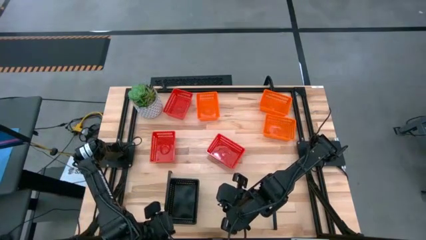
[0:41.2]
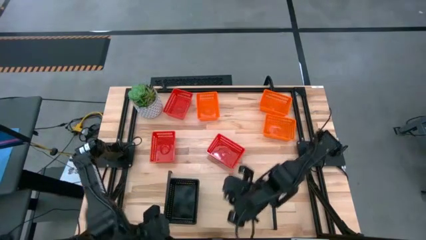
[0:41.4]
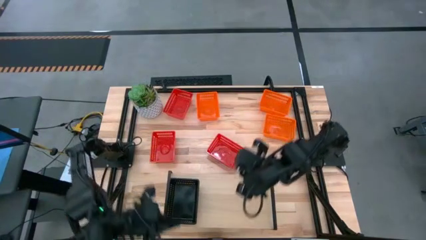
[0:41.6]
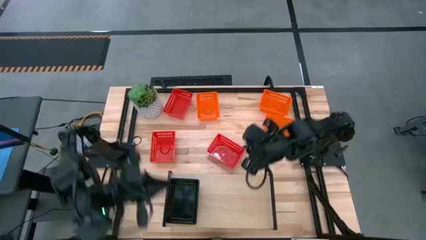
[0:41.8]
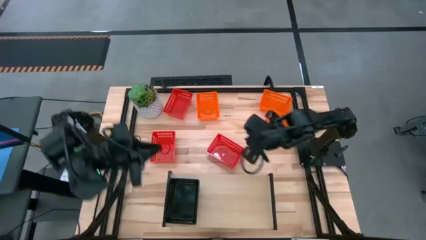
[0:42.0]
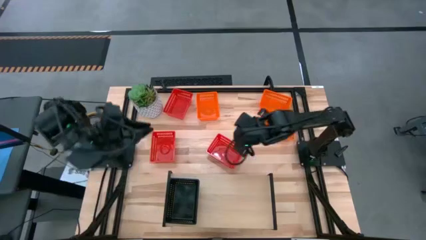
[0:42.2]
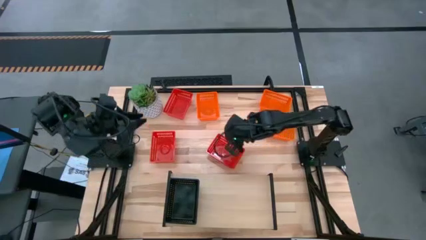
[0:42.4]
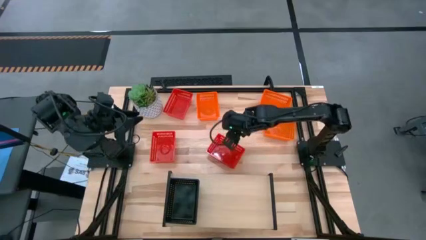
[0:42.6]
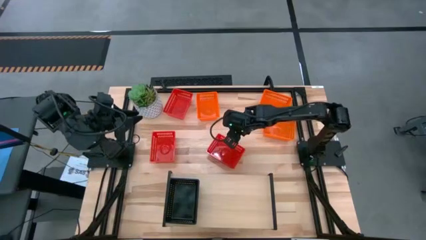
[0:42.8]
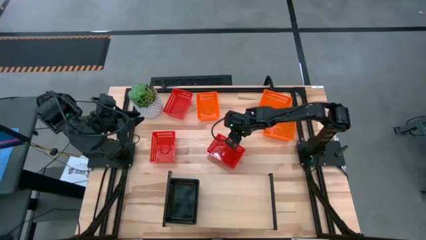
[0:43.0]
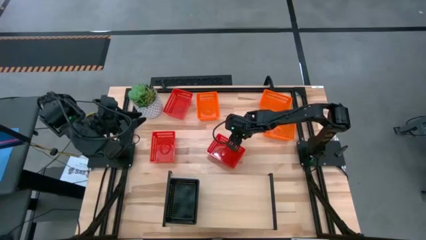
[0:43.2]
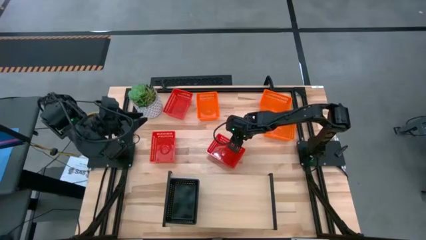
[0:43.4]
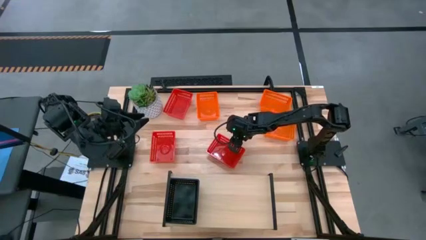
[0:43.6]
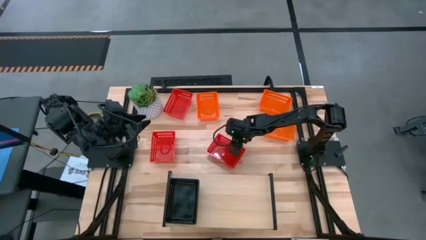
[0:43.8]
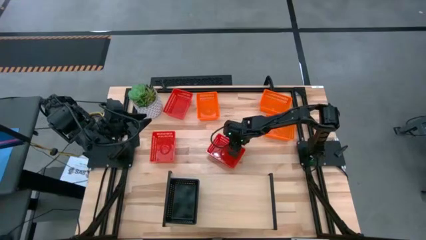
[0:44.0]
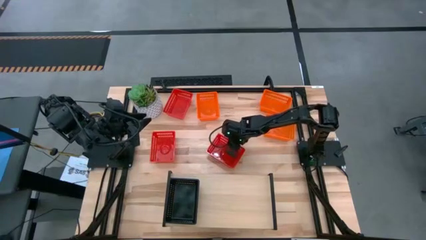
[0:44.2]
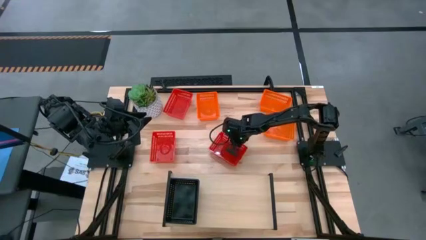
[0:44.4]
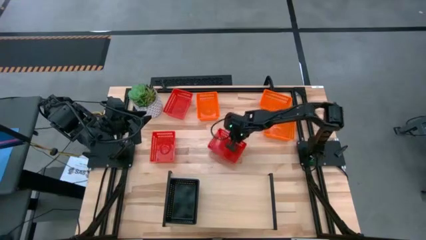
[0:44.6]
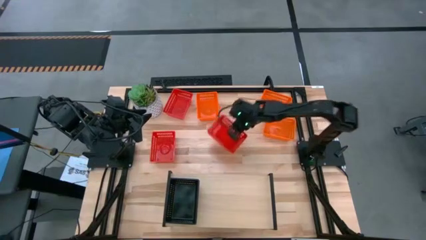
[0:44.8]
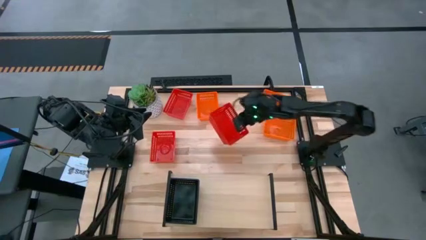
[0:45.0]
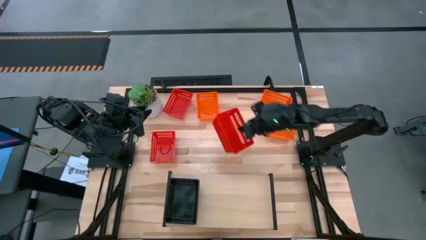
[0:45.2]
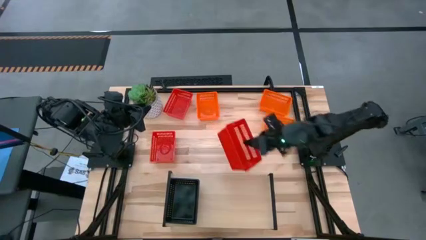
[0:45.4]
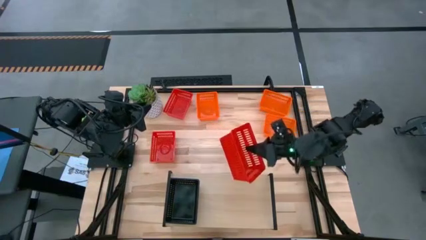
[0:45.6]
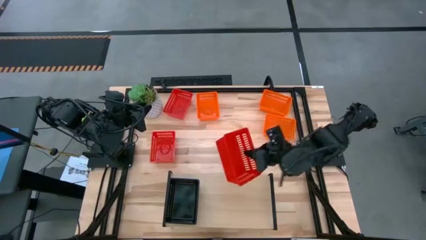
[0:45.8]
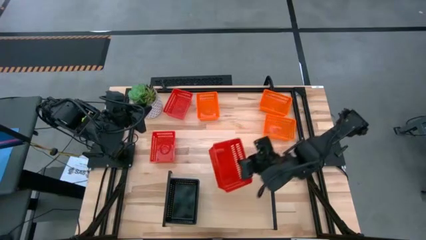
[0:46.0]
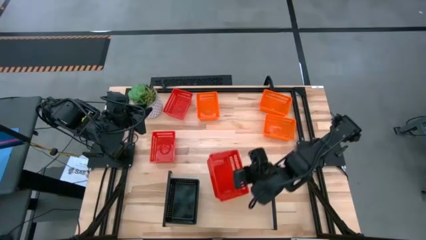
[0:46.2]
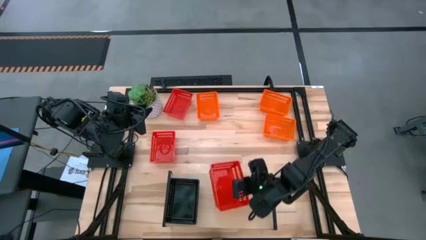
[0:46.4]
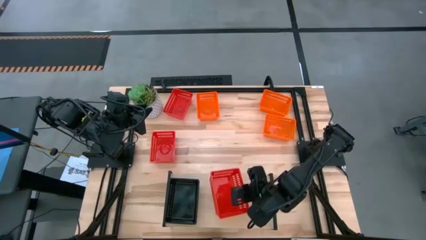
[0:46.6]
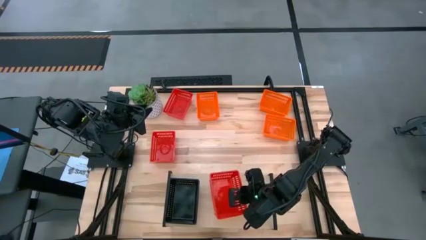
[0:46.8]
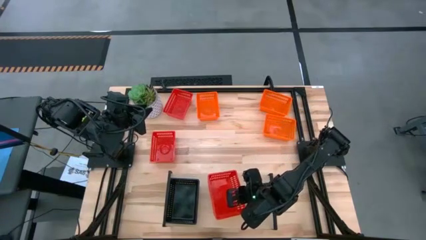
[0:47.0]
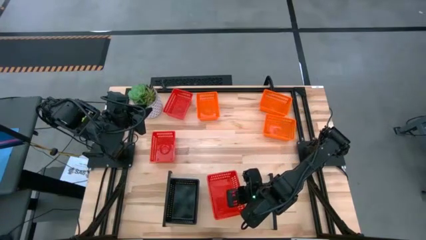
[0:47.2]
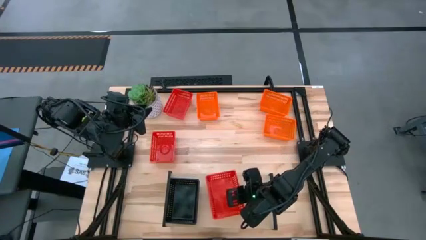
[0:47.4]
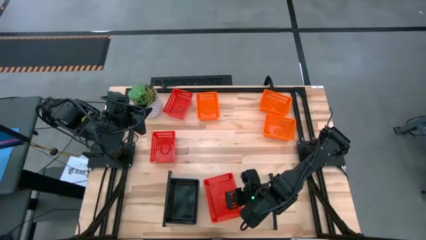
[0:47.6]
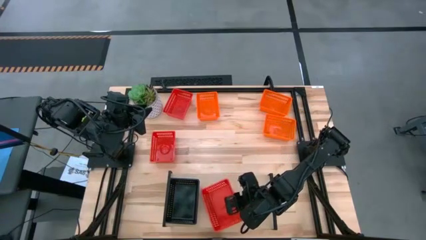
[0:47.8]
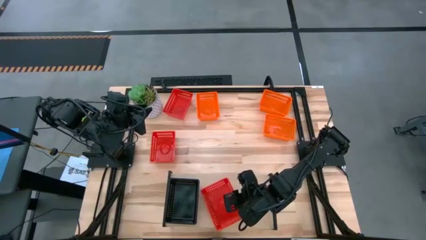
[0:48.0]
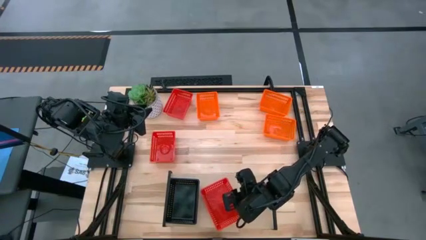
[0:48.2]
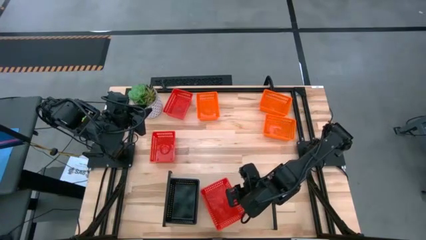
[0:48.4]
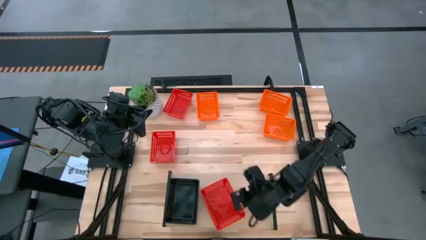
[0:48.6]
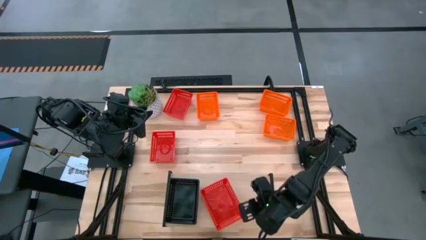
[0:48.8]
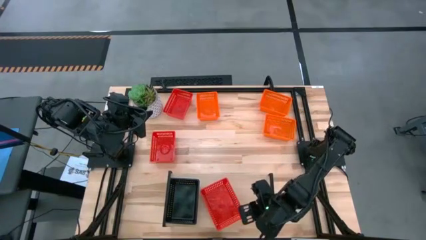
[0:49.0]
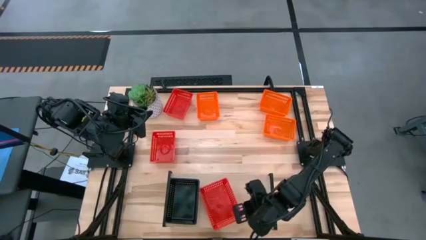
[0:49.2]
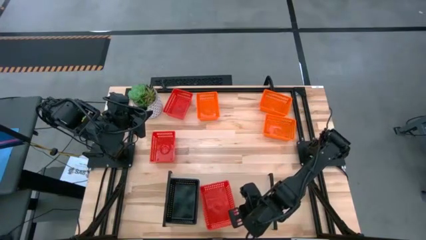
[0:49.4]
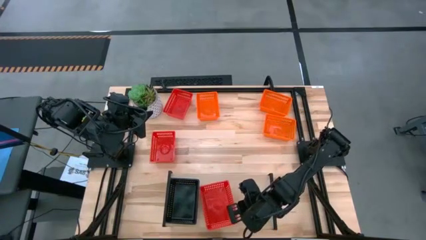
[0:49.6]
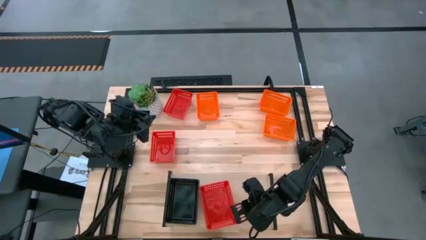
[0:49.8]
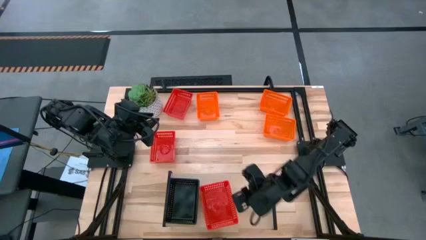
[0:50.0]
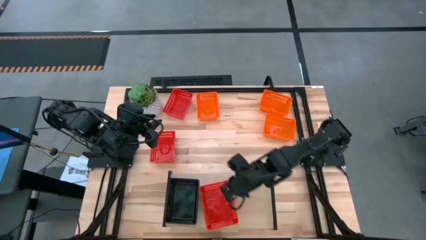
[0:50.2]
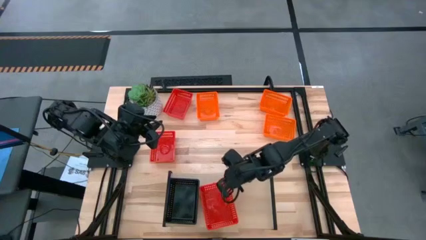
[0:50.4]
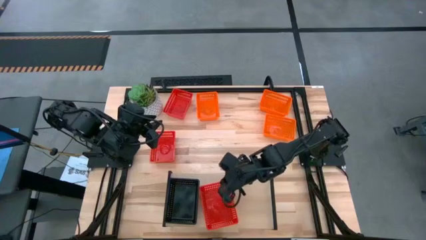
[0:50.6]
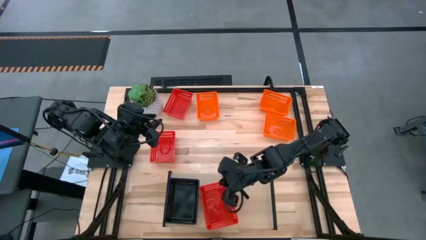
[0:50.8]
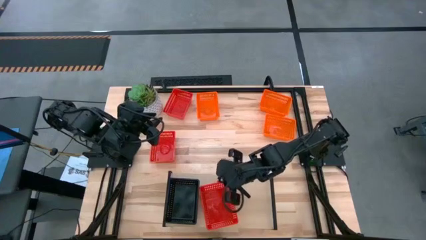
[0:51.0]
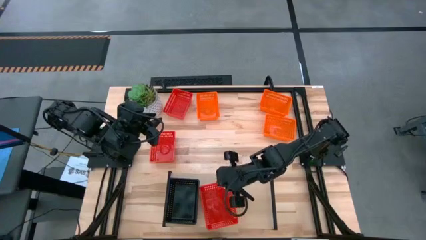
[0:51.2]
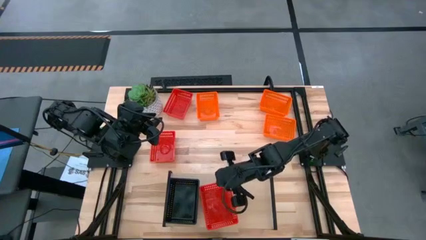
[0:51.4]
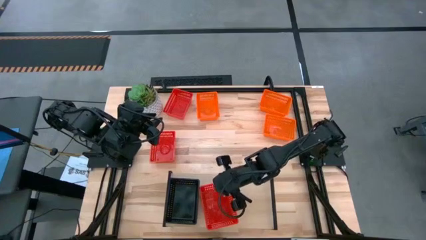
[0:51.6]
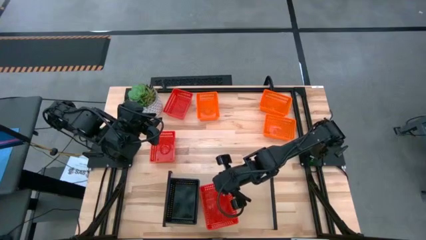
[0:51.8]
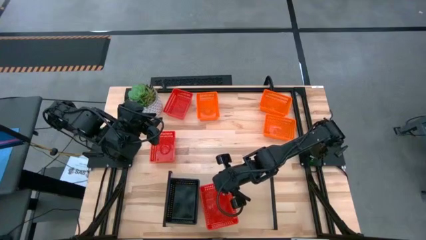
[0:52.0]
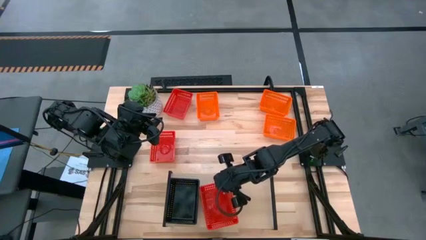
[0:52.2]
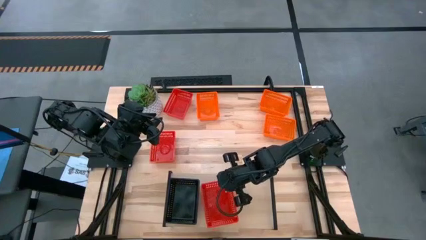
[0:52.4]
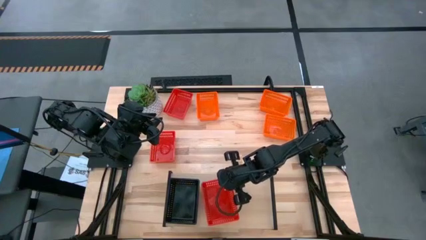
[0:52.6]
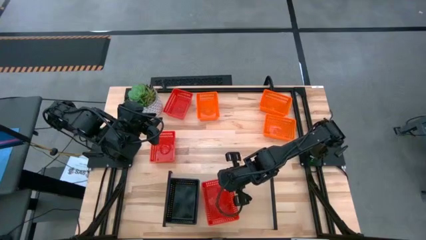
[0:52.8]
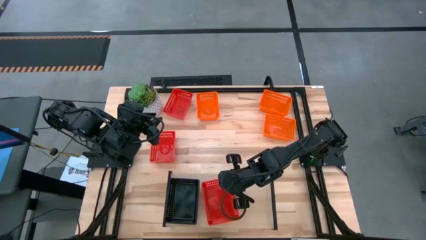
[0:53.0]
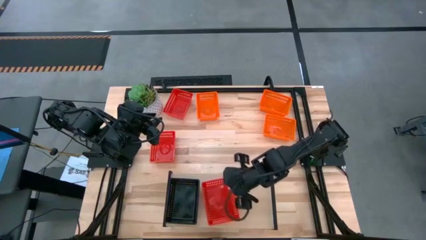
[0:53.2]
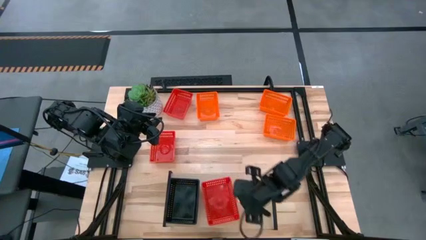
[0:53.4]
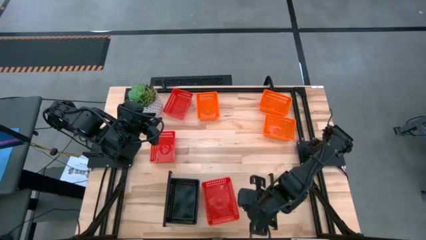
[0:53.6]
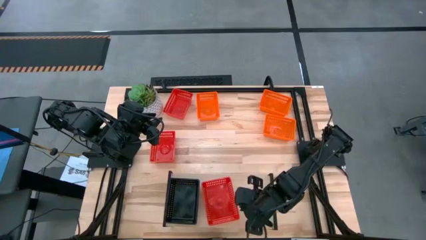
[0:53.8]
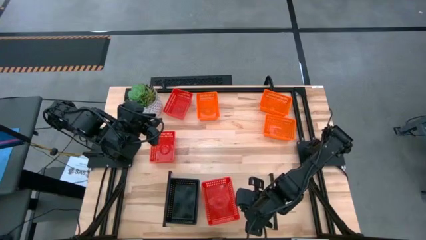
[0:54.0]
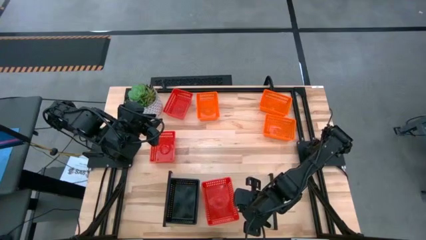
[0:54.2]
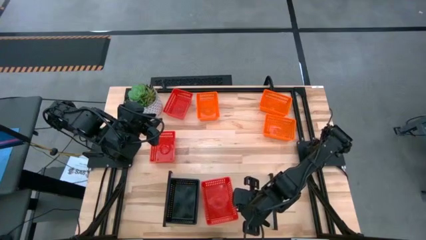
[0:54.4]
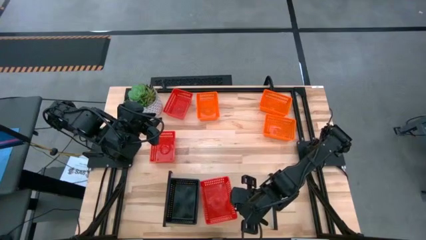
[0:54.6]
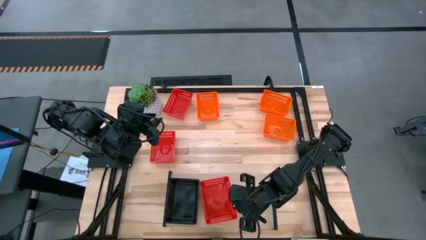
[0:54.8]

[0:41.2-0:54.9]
Task: Stack baskets on shelf by color
Put the bottom right red bin on the shelf
